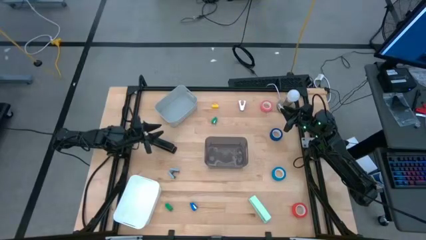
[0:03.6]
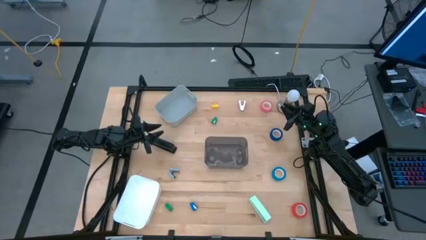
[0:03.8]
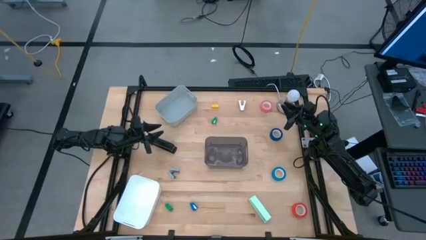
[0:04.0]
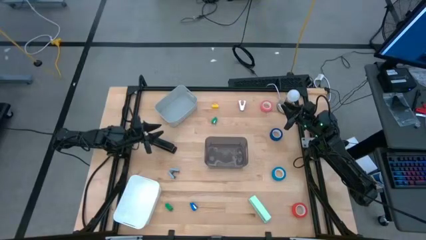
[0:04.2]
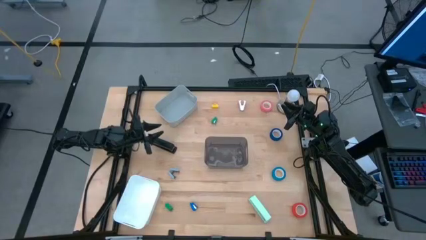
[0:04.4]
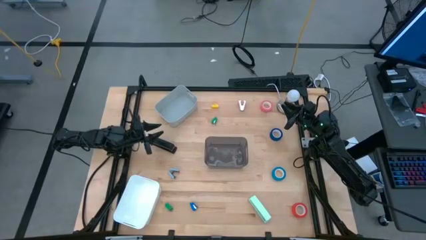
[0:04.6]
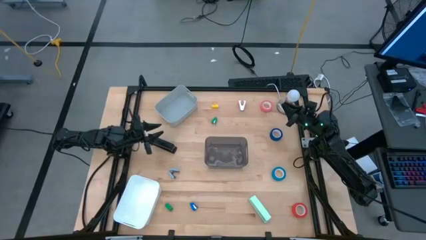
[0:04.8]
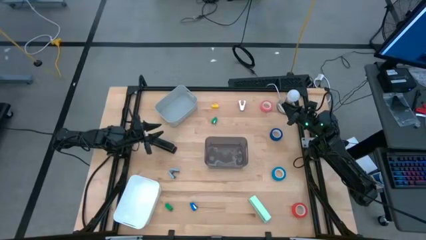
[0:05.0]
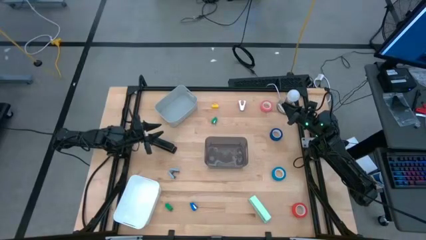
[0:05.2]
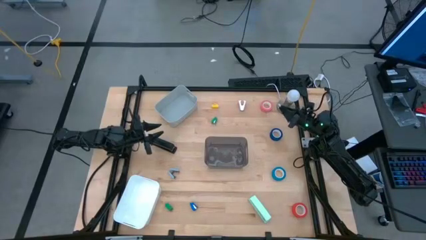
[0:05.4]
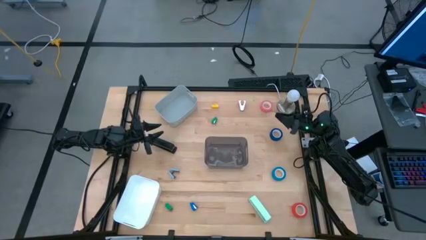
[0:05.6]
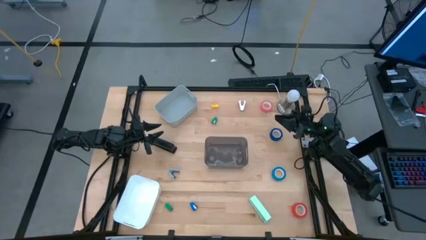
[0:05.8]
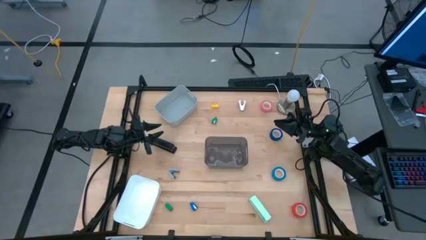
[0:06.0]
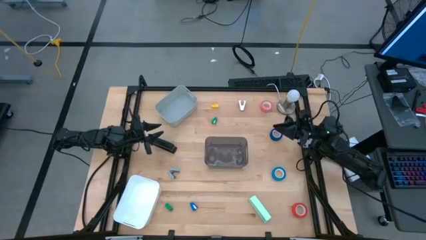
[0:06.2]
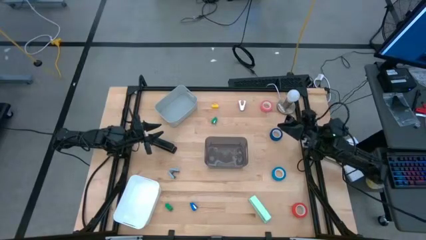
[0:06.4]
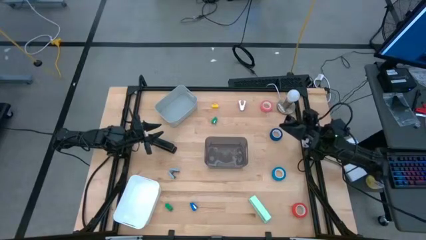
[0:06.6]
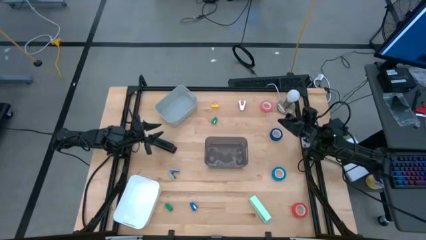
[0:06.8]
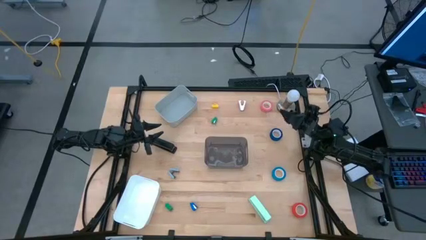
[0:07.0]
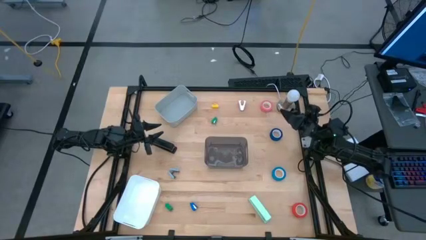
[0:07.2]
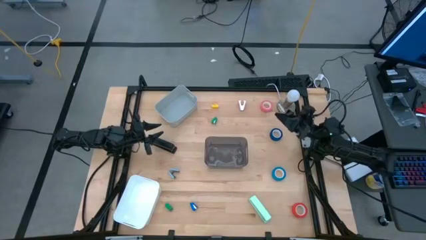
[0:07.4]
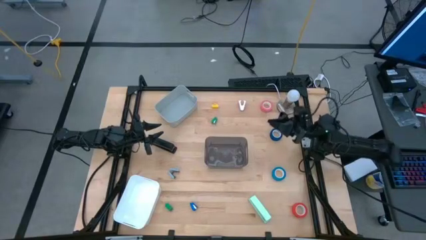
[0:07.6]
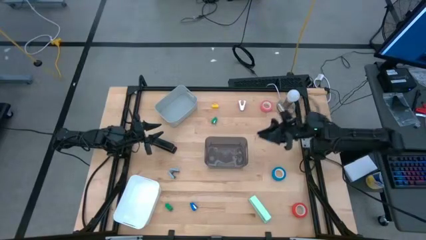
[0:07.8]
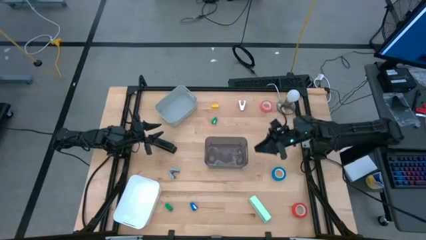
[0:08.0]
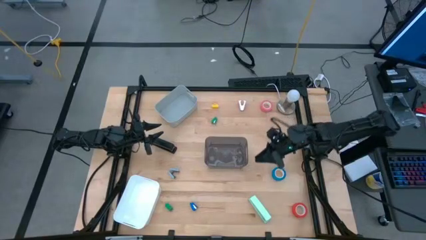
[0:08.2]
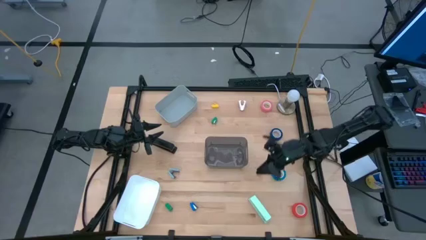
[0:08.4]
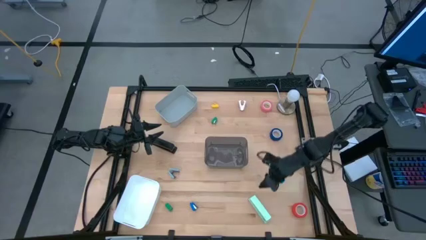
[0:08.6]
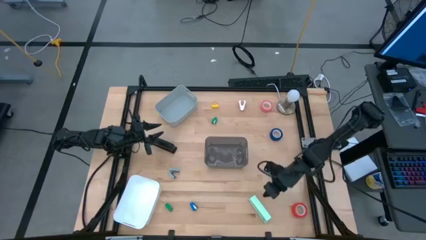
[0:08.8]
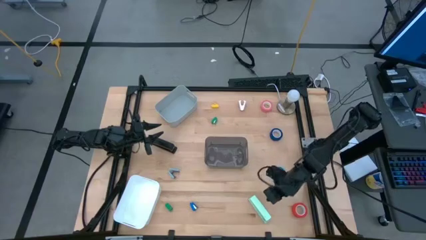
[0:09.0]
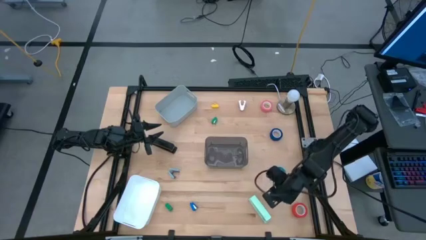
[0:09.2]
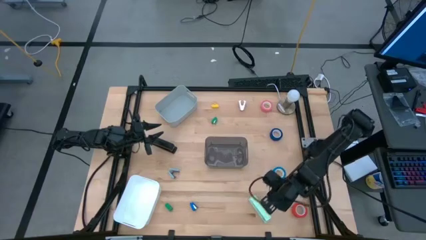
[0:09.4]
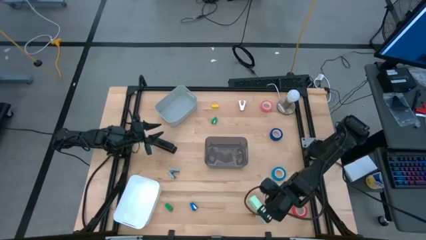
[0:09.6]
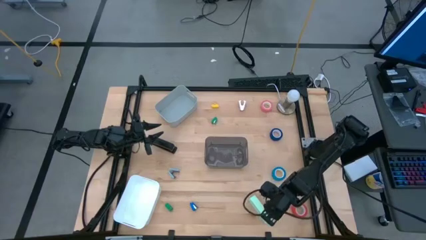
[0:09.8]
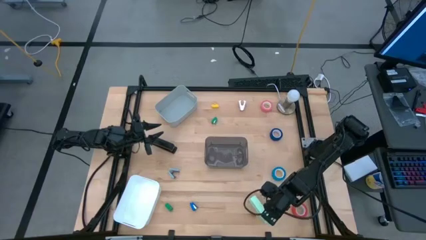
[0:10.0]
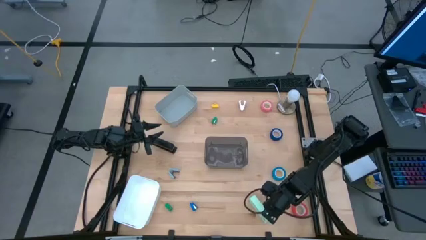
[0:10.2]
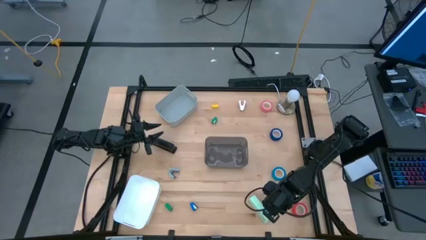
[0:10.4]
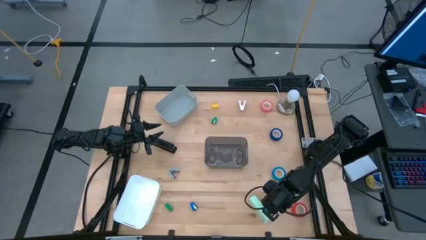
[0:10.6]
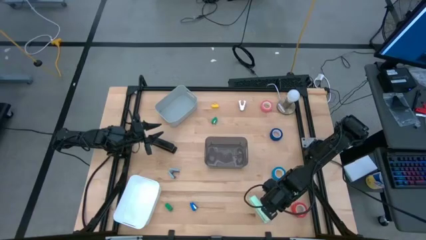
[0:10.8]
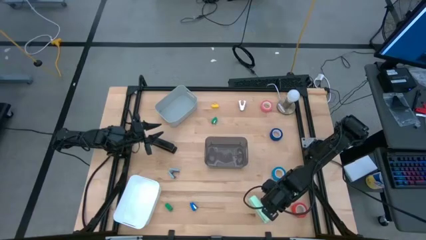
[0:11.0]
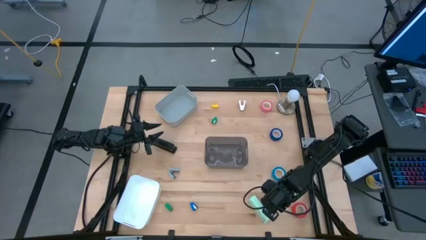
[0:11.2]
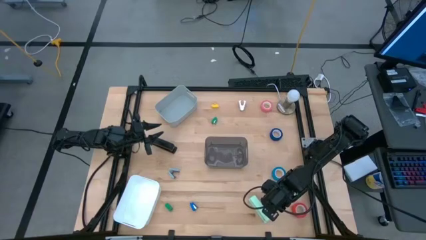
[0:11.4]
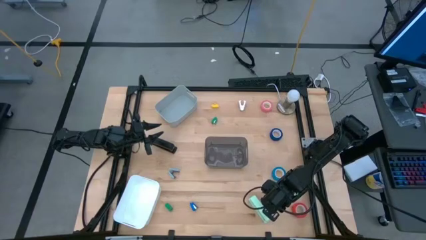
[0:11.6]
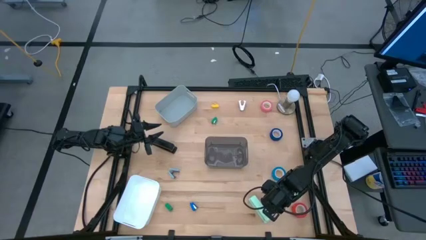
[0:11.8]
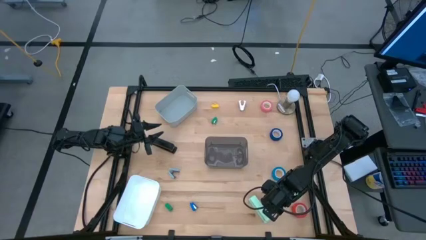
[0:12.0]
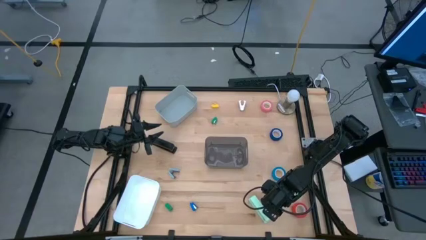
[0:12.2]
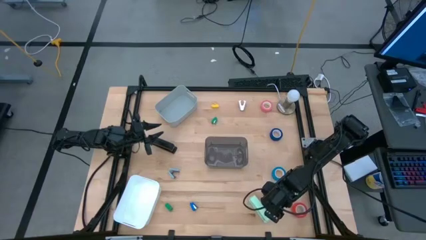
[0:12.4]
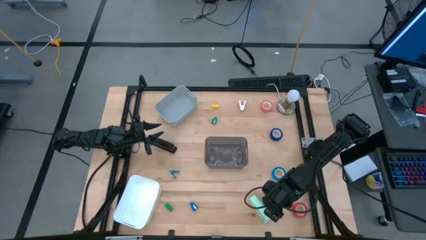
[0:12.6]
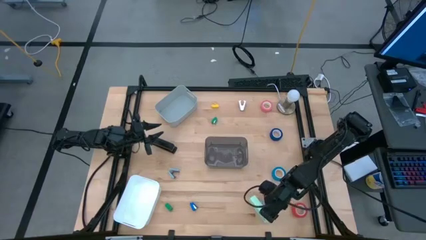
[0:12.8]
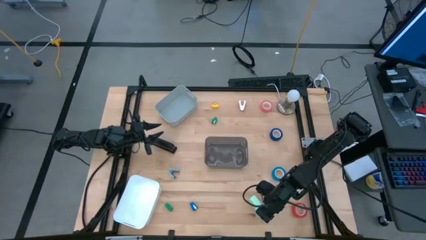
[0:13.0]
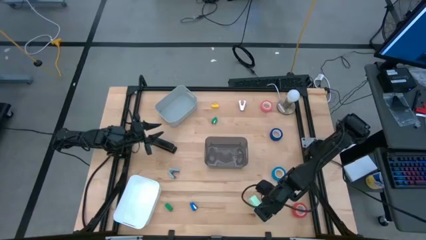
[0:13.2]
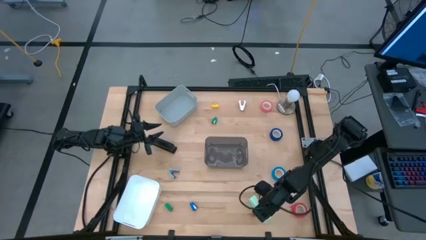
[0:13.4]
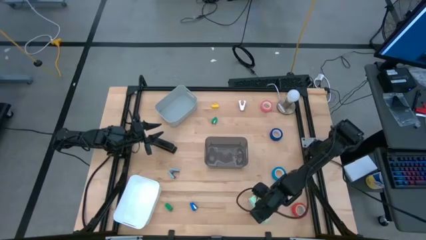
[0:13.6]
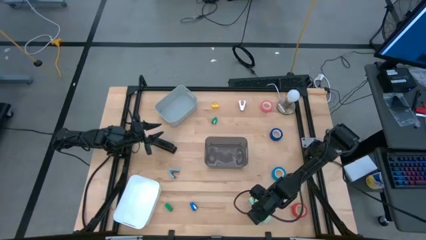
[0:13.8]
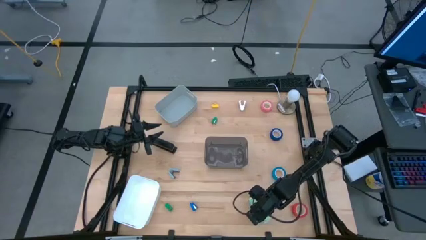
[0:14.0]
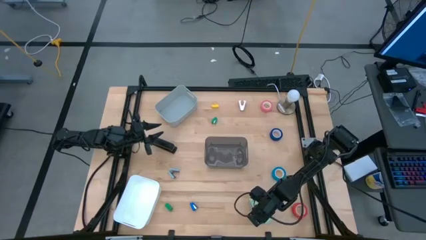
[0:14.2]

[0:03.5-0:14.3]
Task: Pick and place Stapler, Stapler remover, tape
Put the light green stapler into the gray bin
